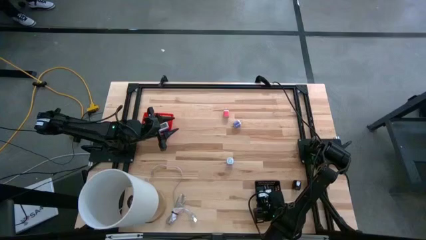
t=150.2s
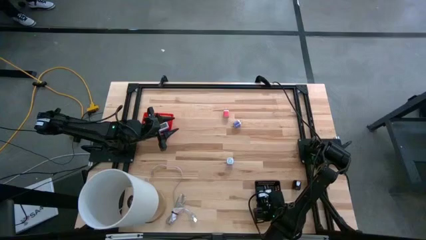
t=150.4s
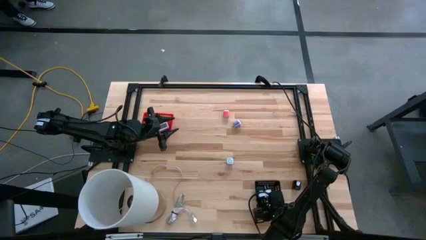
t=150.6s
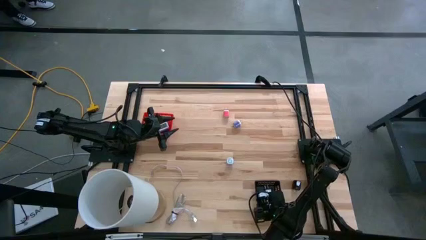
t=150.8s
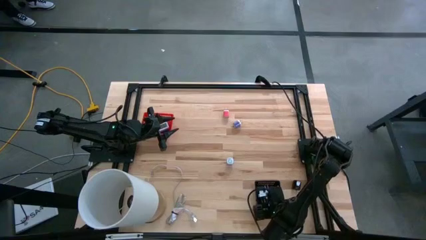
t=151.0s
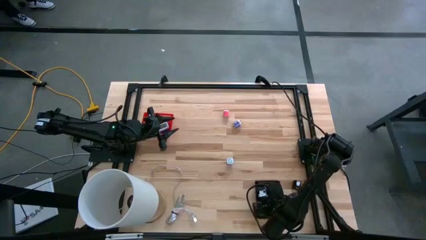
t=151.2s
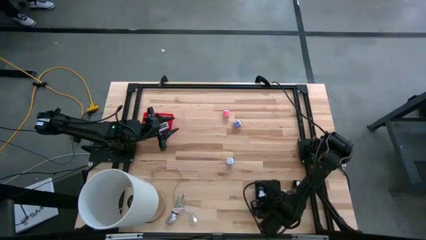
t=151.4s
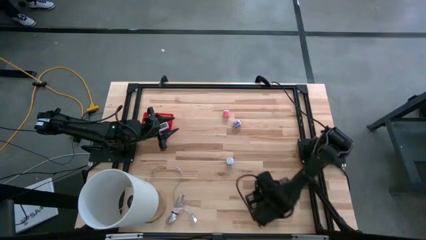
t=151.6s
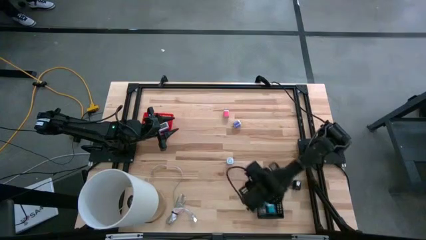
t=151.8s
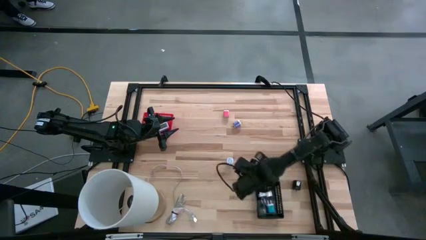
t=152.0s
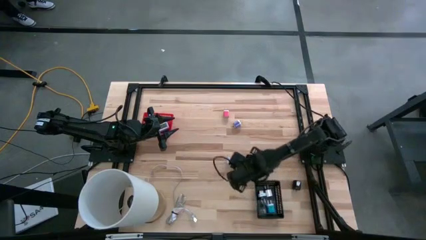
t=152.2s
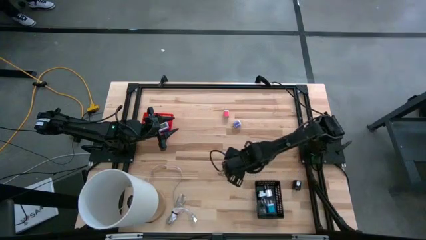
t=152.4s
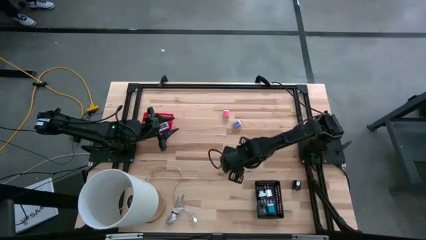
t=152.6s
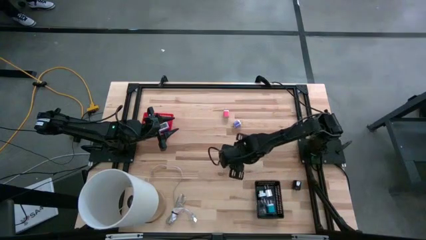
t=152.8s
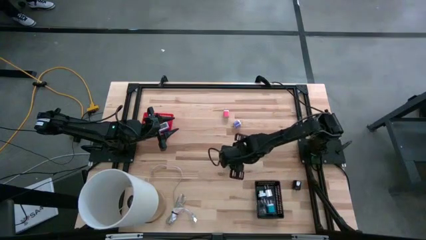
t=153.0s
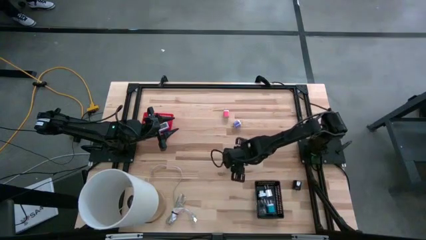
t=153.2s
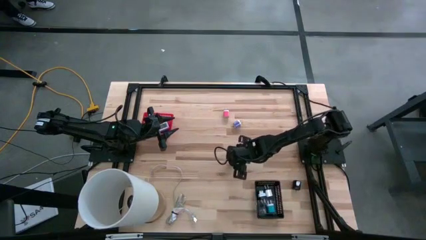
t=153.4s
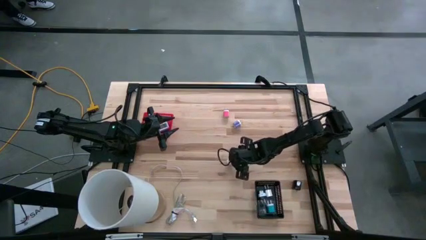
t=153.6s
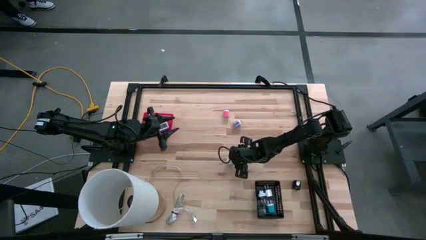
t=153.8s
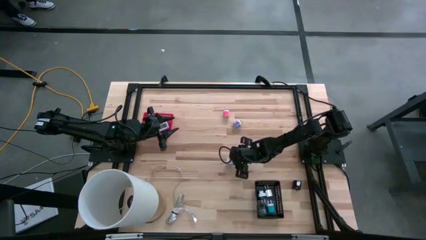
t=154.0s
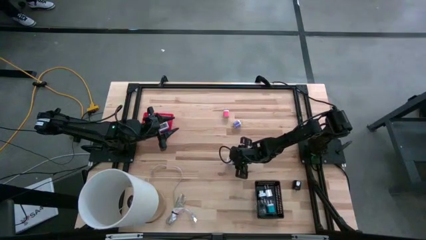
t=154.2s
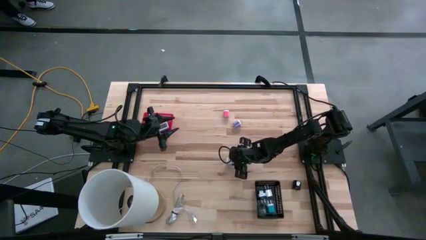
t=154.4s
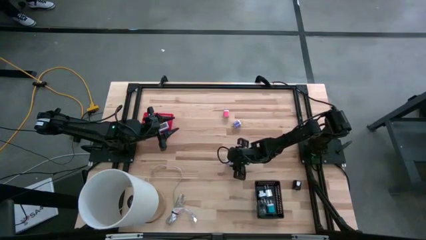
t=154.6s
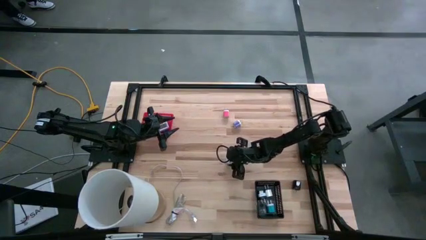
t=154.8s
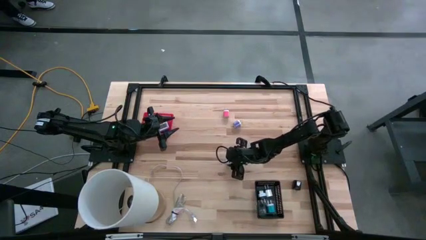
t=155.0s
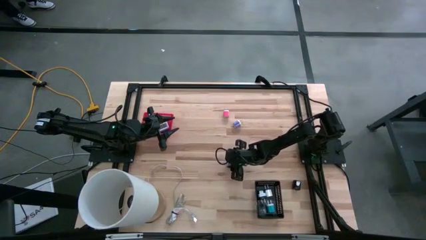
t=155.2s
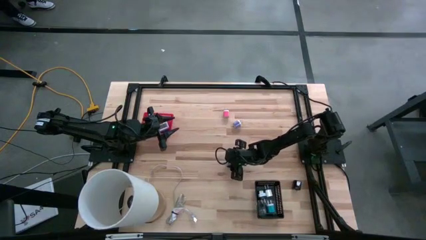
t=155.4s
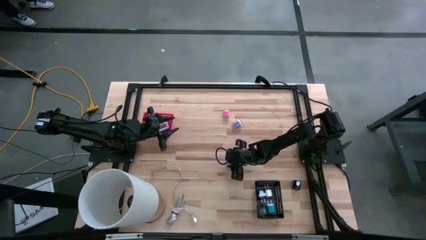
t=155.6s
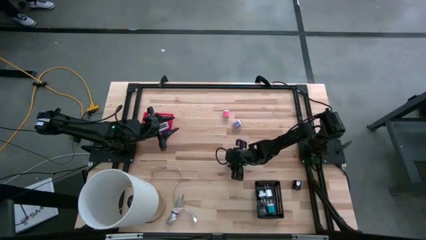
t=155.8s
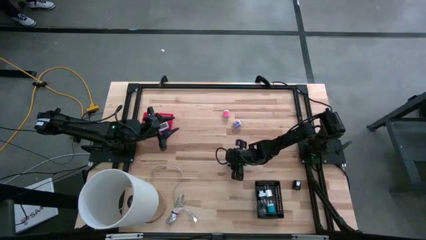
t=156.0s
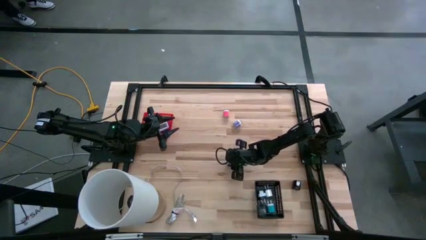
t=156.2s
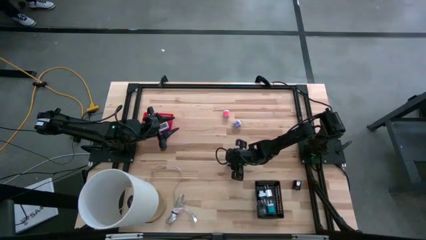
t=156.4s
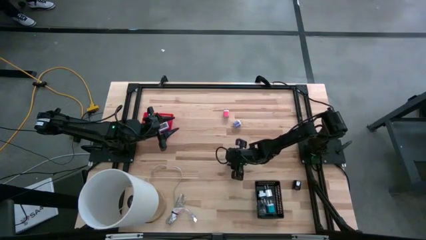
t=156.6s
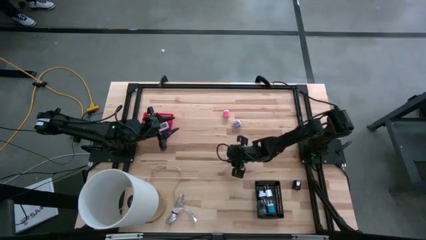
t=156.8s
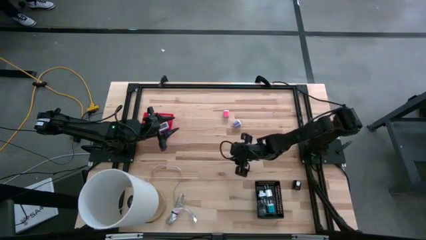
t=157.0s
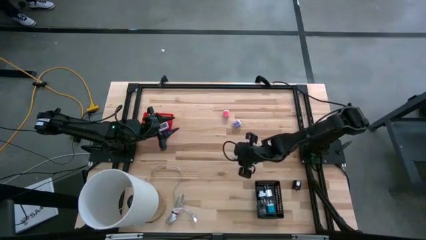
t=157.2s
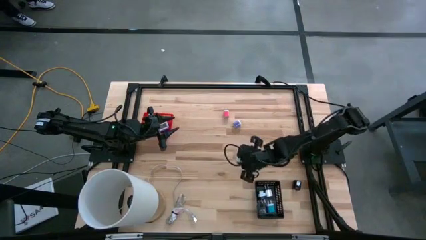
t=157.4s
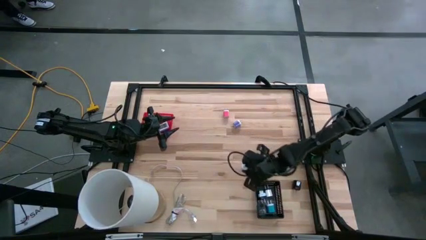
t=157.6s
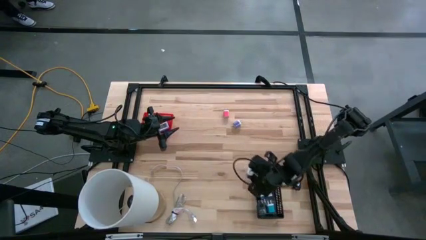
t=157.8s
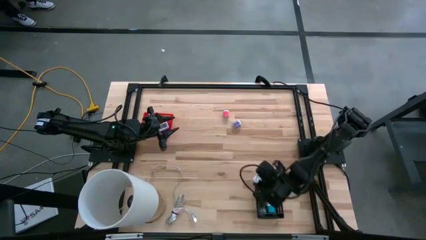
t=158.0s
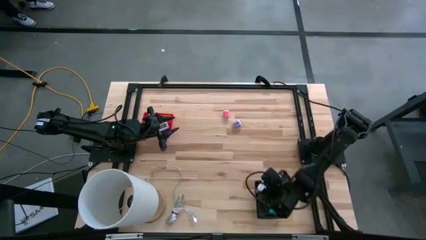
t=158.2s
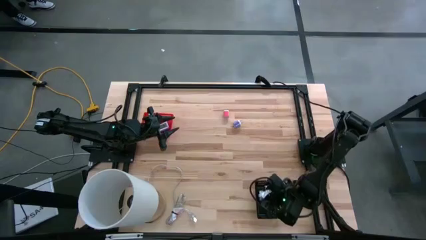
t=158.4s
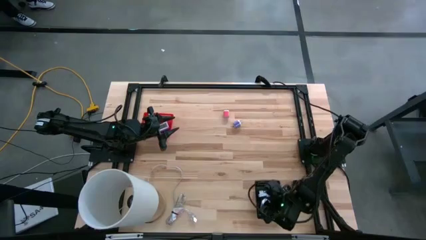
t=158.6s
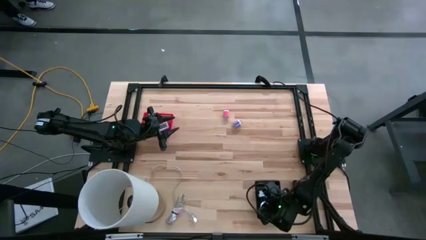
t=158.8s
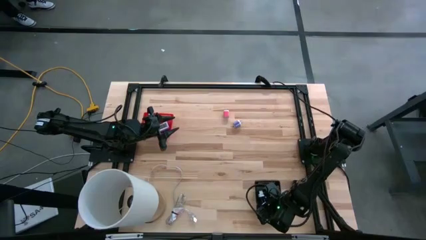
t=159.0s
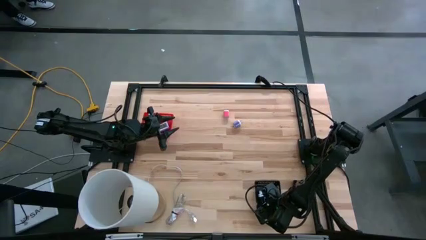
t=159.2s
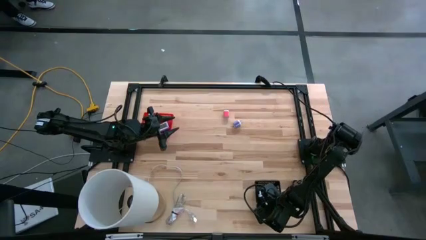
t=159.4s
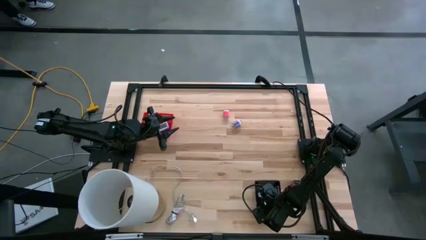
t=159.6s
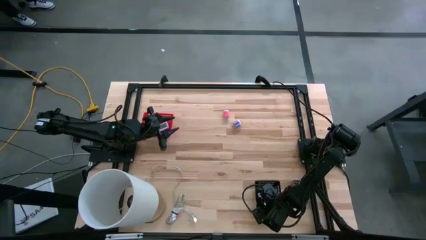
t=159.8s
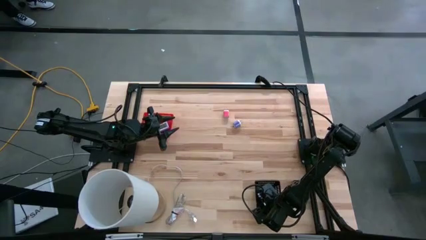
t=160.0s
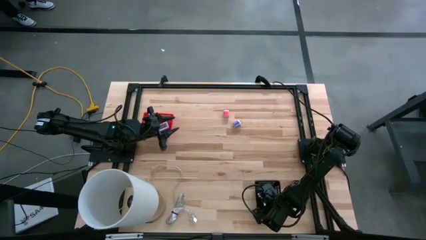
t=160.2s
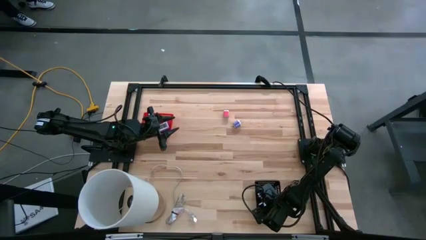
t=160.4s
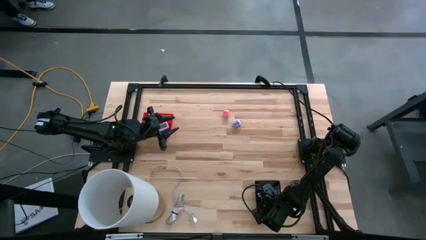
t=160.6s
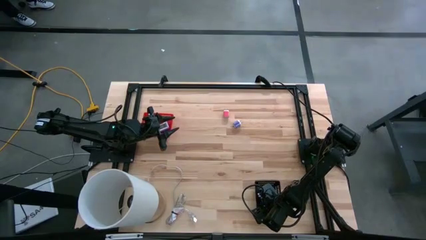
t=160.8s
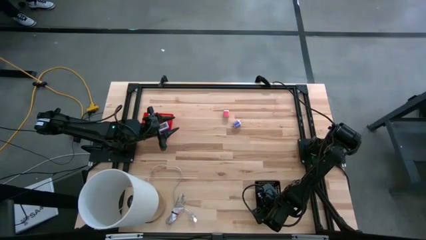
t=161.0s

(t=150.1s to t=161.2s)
Task: Pick & Place Office items
Put the blue charger adapter into the black bin
